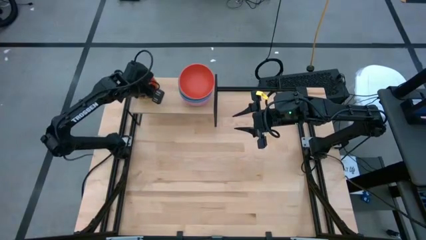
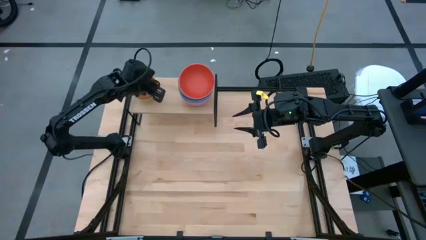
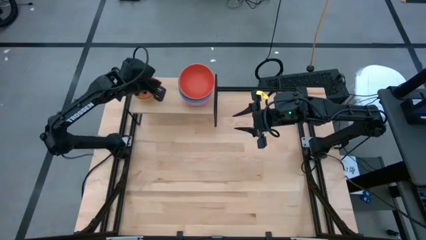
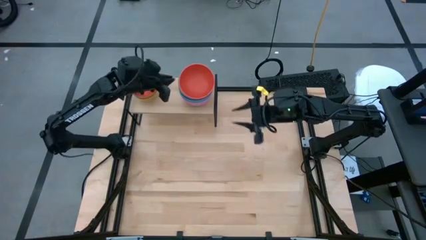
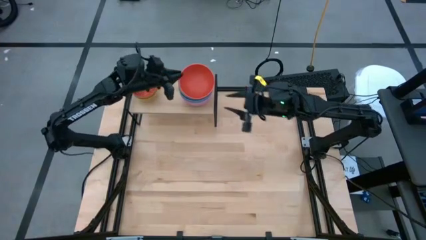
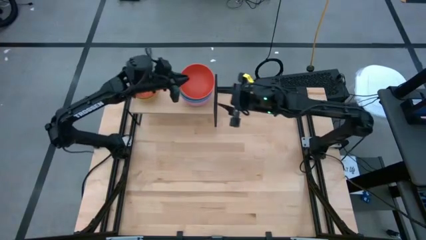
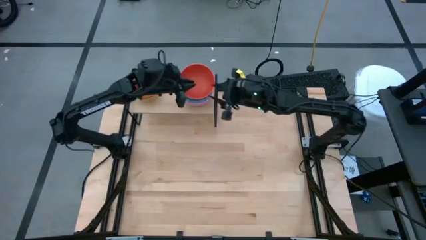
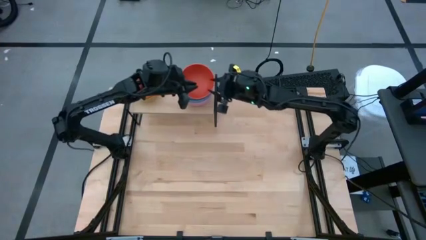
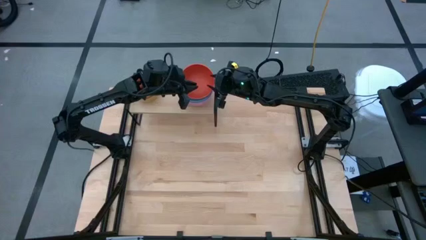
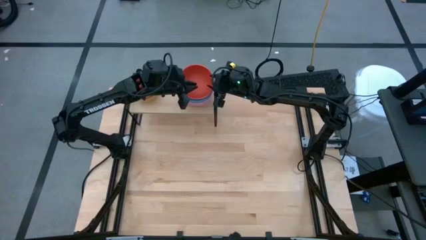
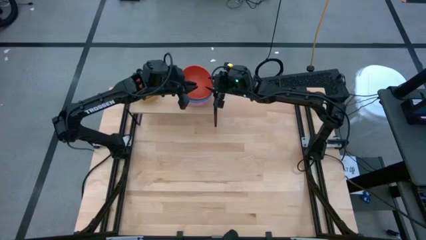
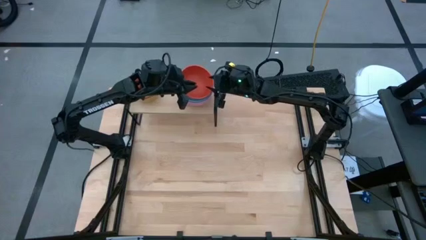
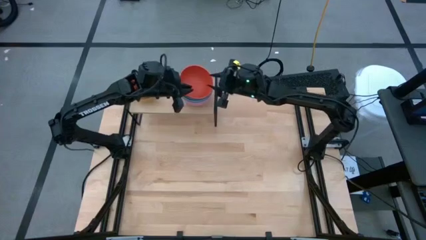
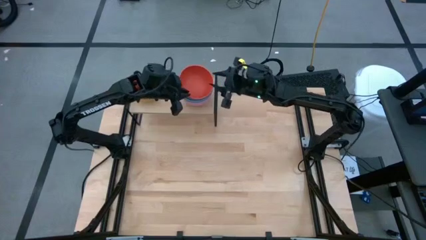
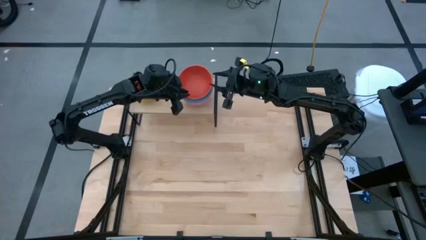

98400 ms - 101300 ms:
Task: Place and stack bowls onto a shelf
Adjust the bowls on the shelf

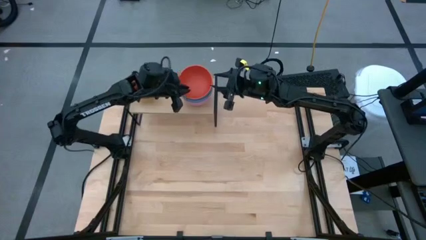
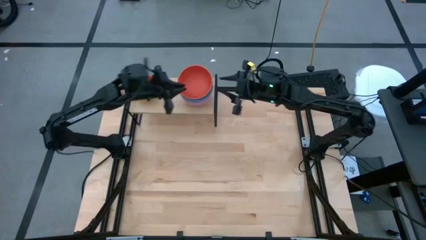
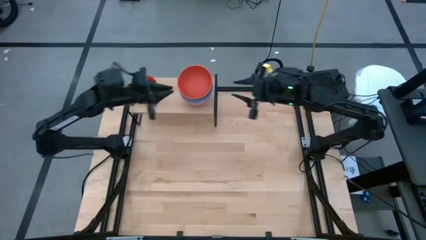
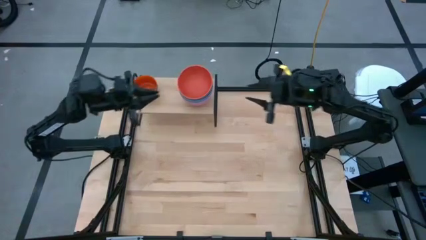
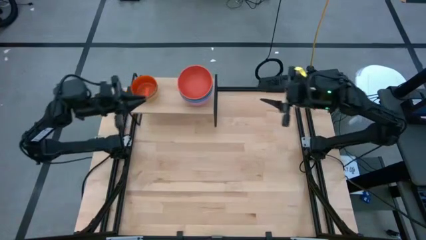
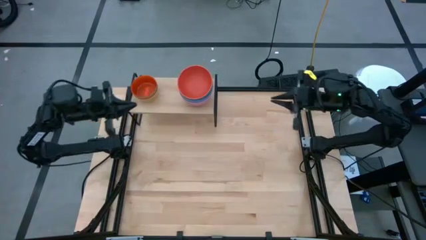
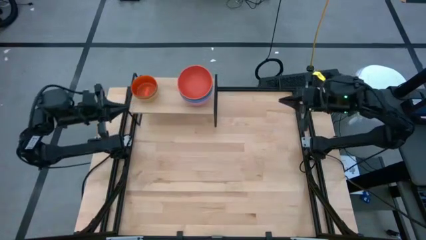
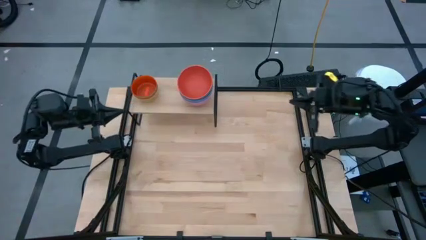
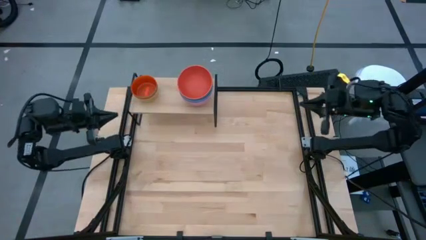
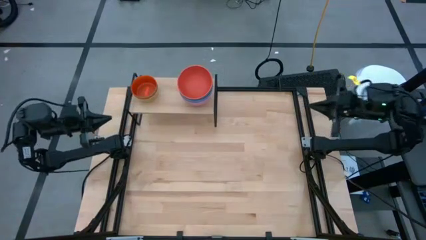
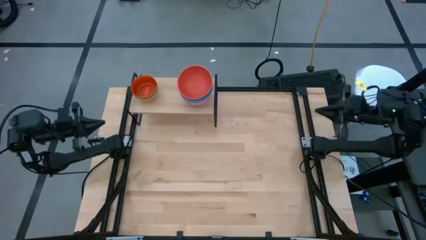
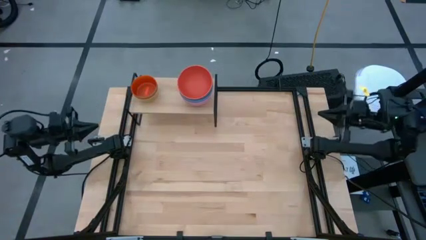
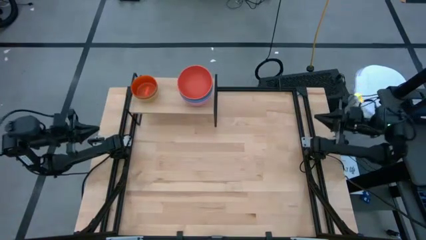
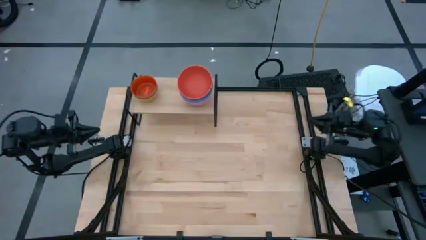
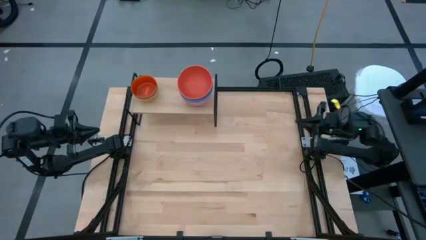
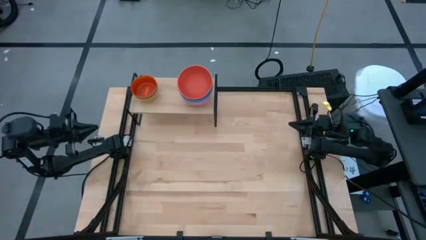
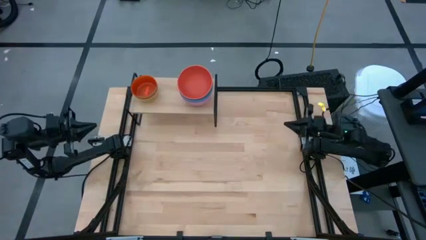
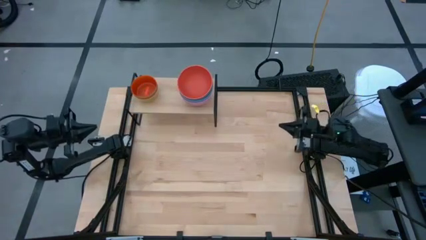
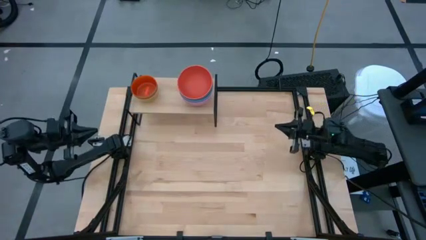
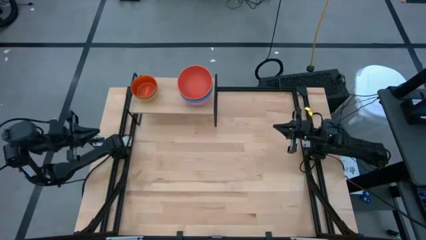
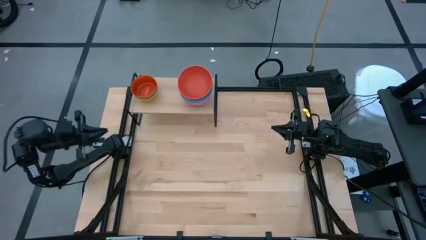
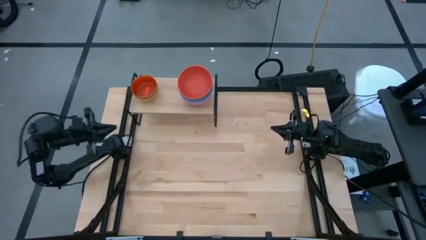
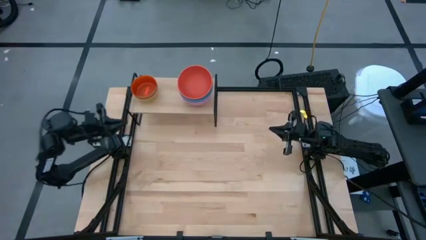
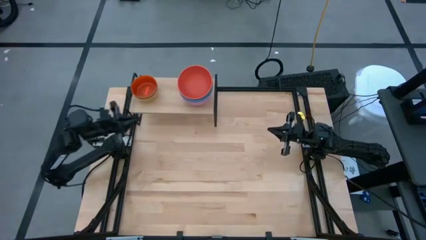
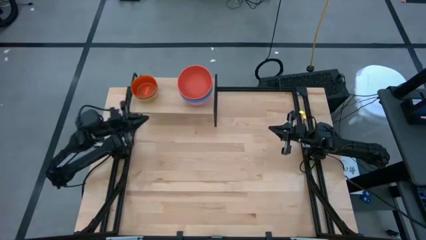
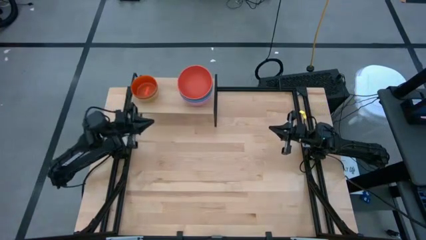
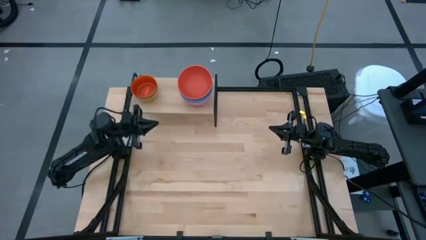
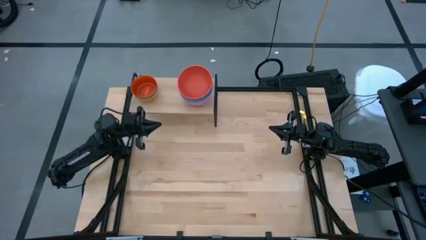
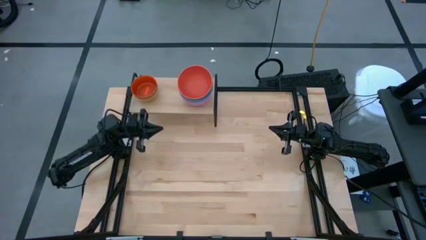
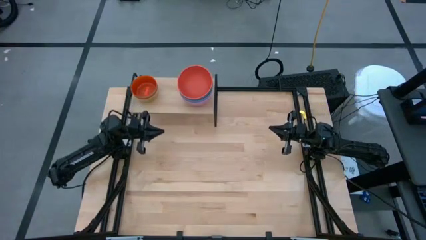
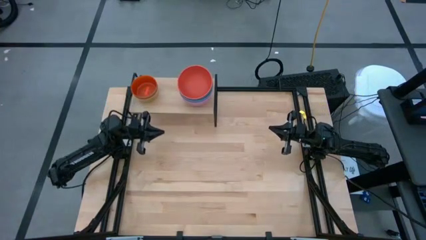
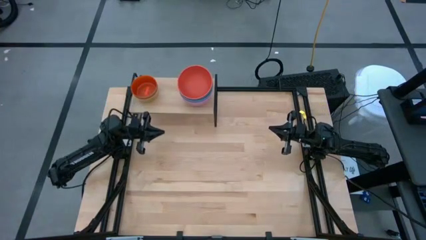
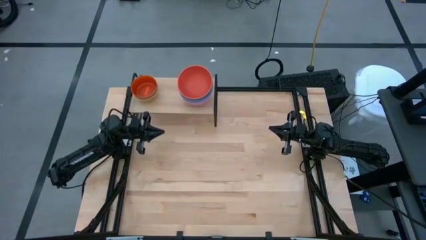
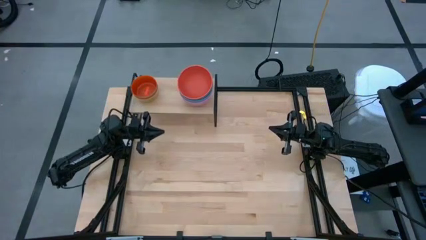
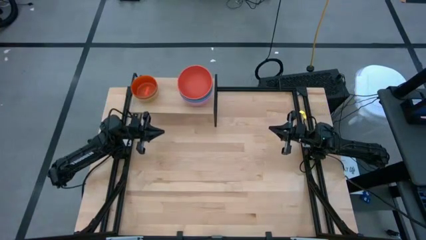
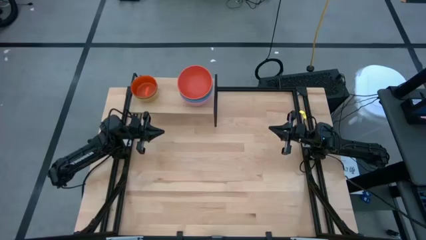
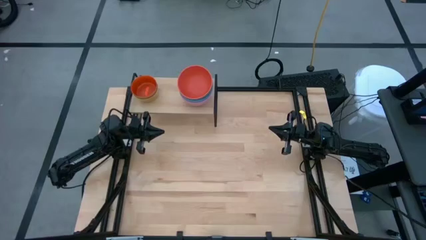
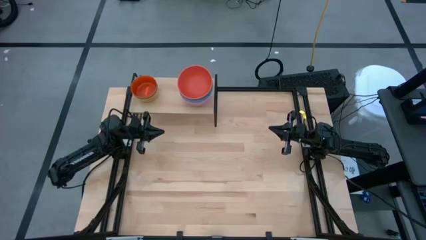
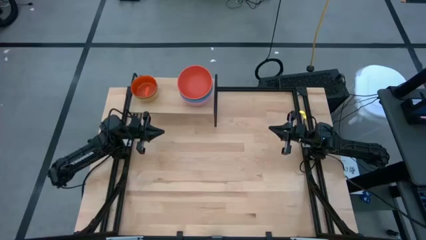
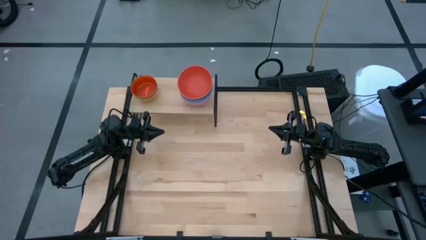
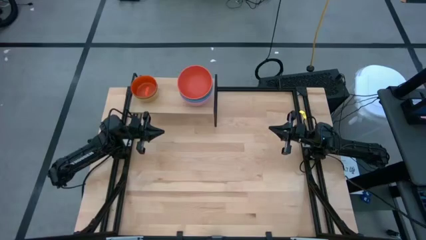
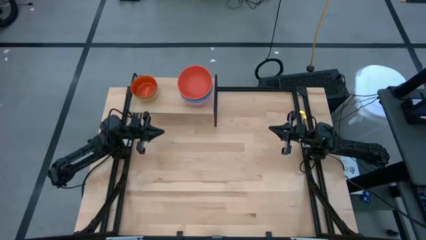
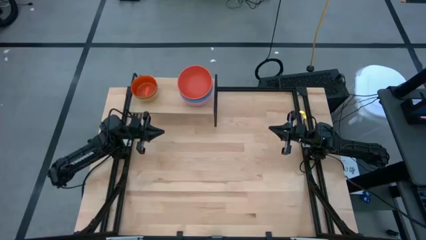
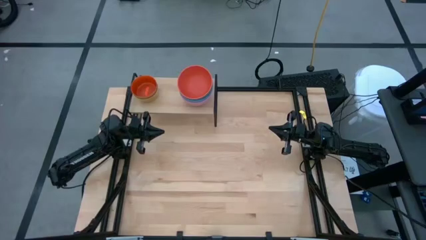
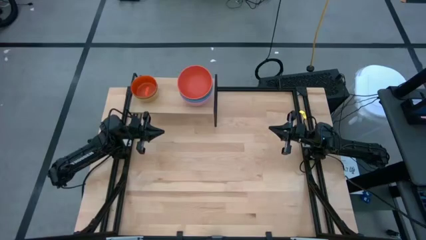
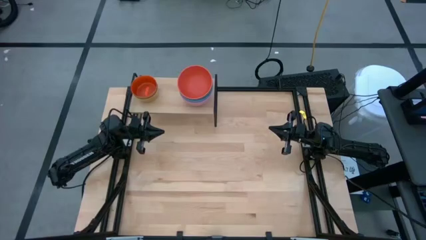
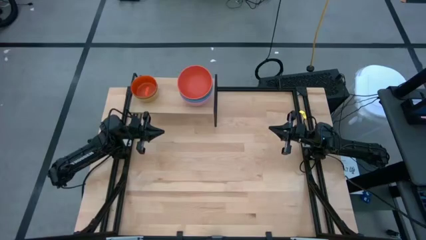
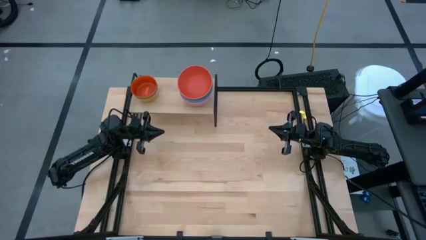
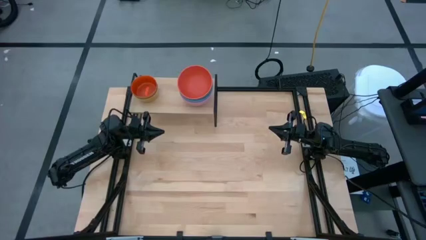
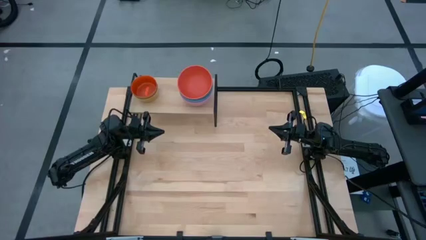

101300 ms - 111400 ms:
Return to Home Position

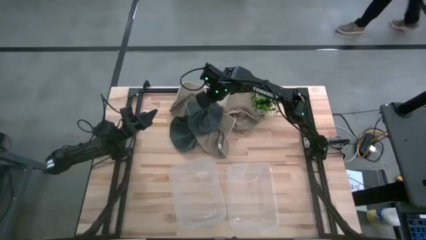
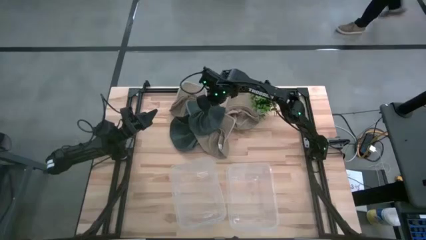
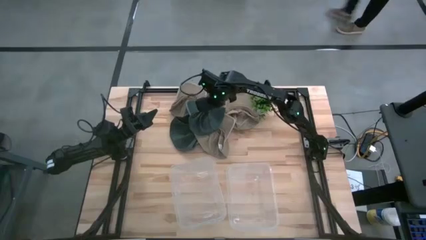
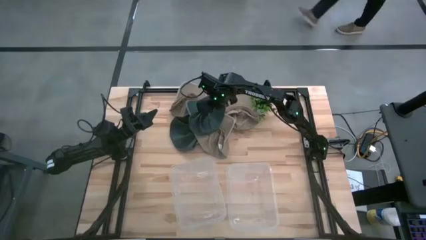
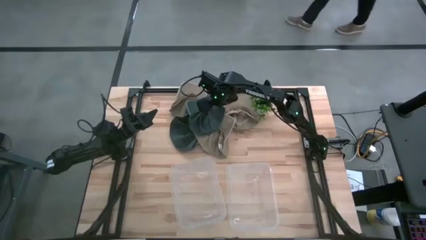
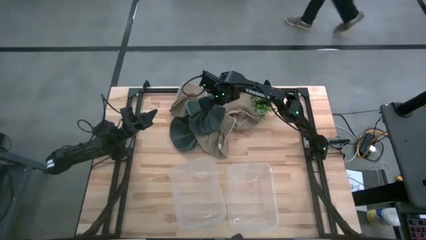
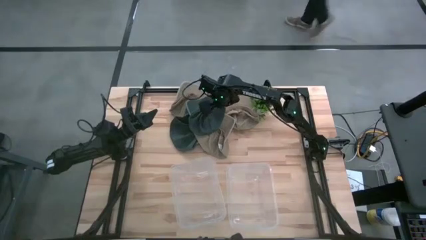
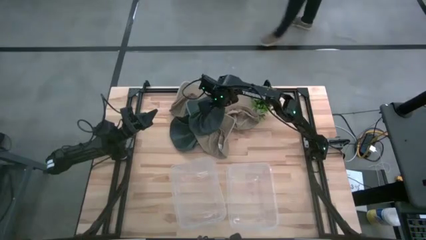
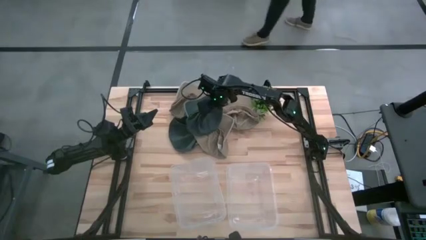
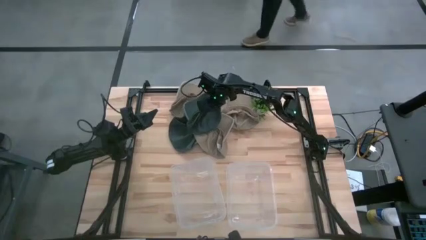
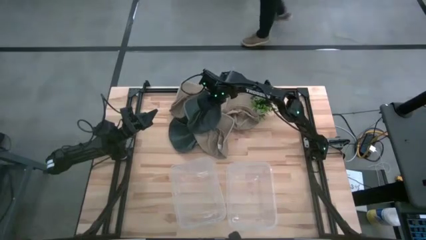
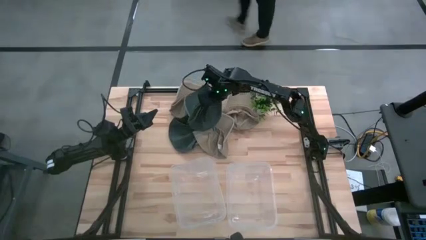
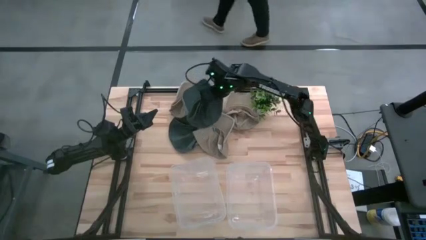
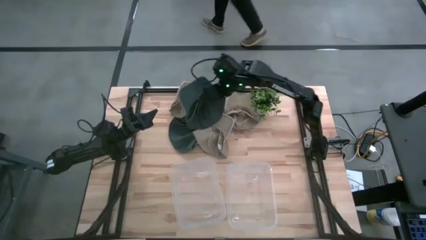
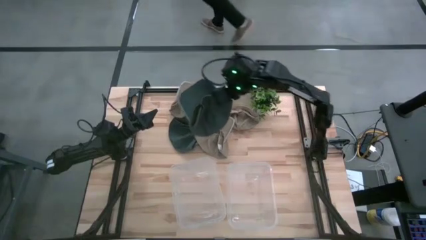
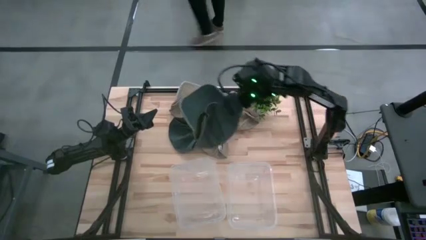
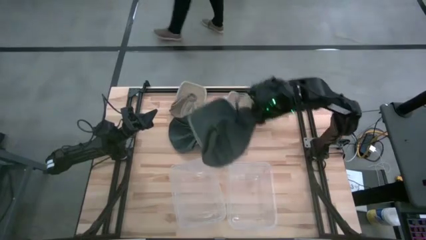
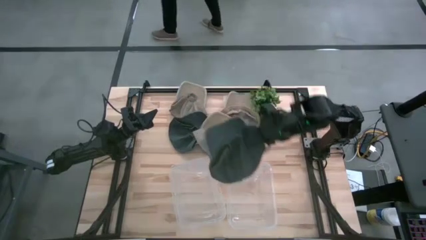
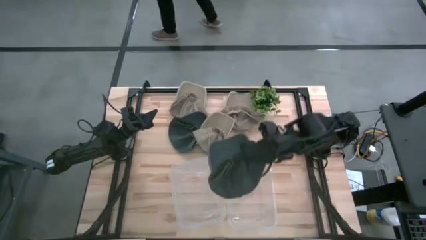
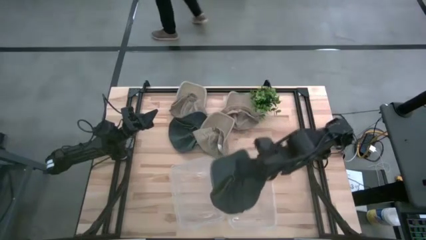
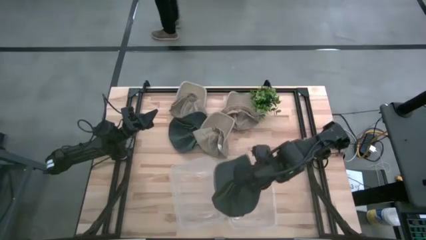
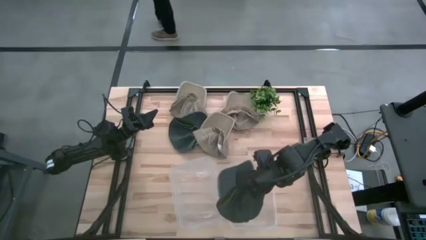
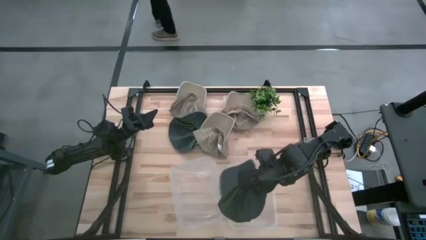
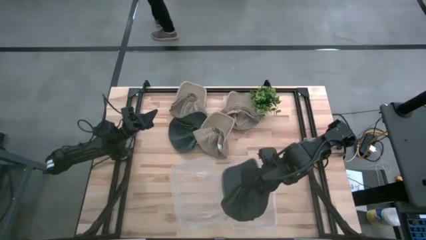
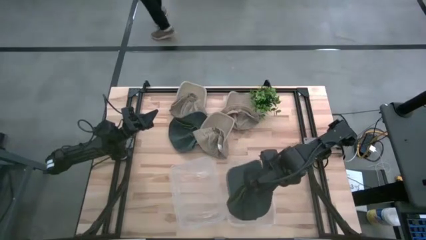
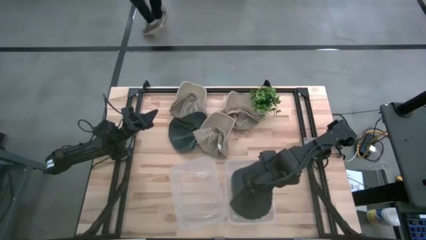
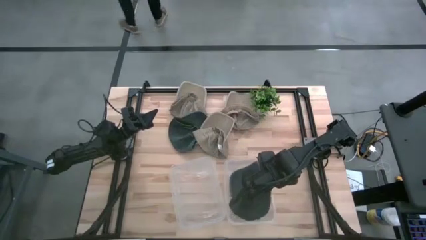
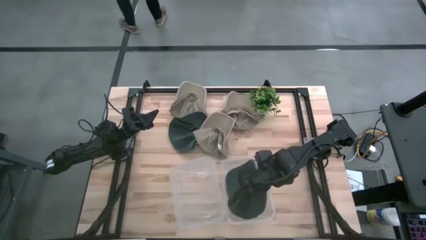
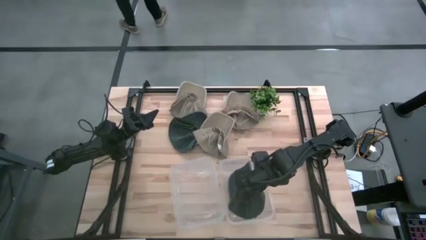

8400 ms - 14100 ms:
Task: Pick & Place hat
Put the right black cap into the right transparent bin
